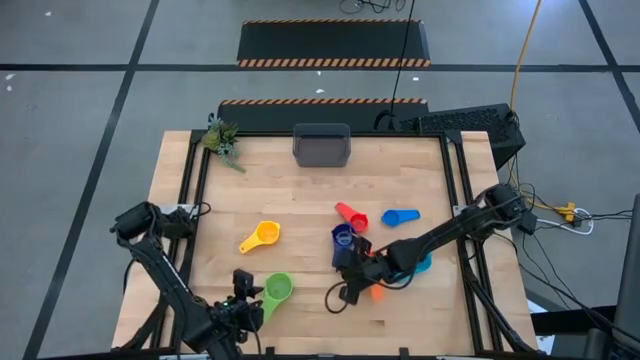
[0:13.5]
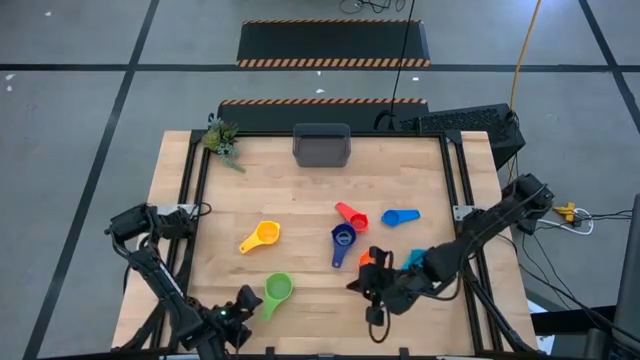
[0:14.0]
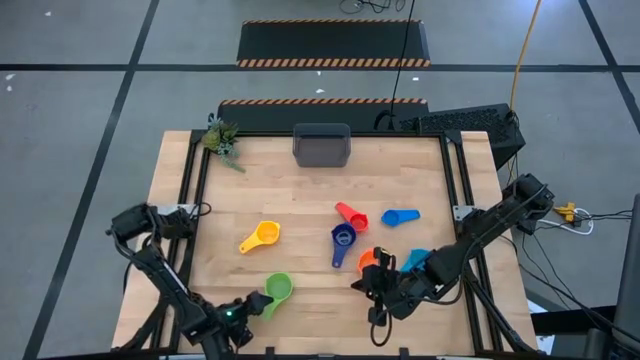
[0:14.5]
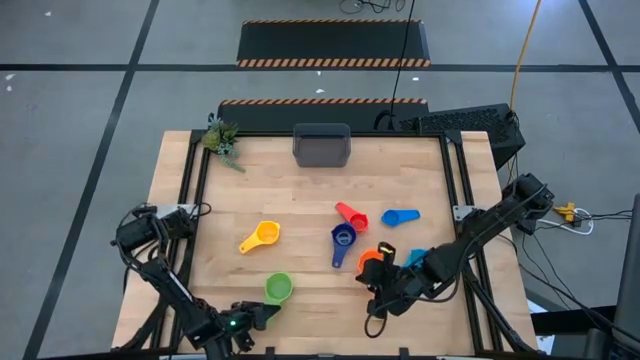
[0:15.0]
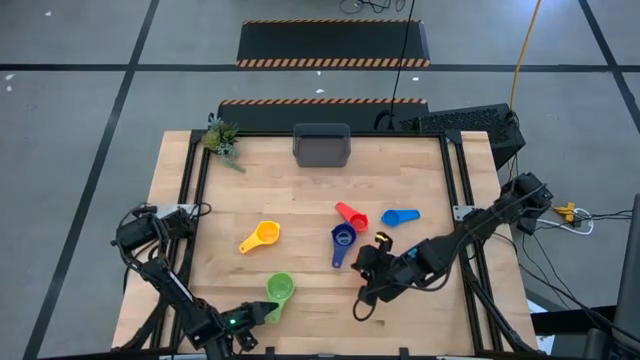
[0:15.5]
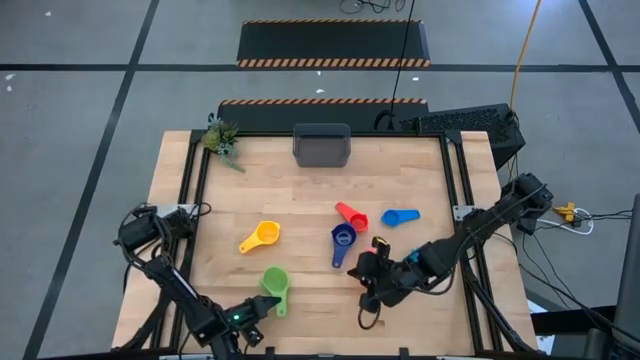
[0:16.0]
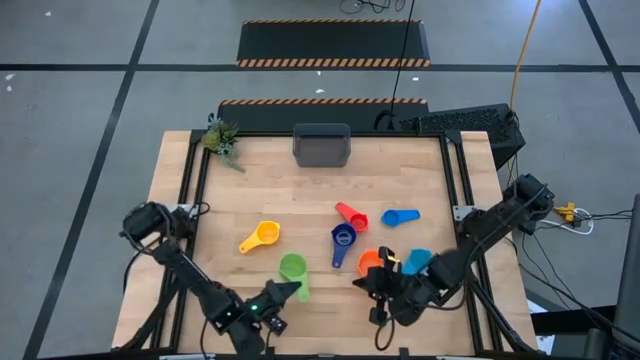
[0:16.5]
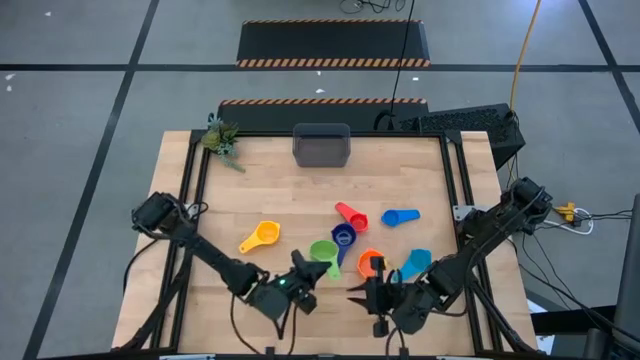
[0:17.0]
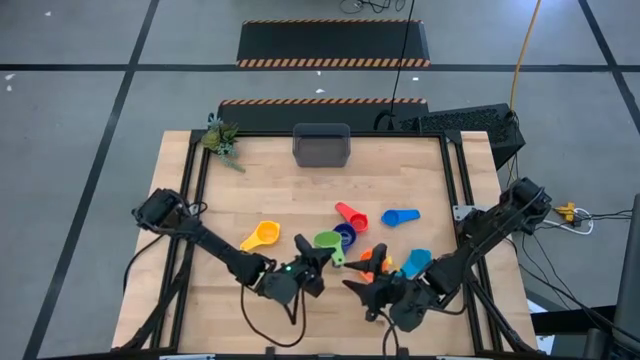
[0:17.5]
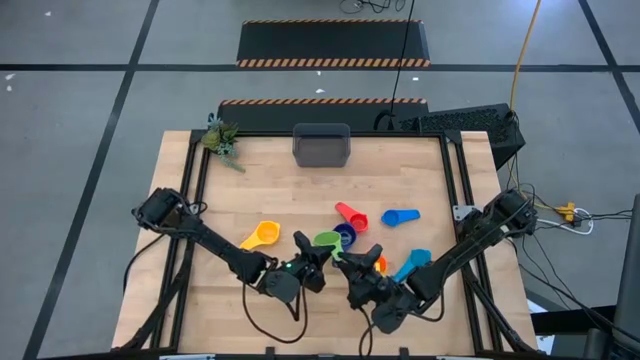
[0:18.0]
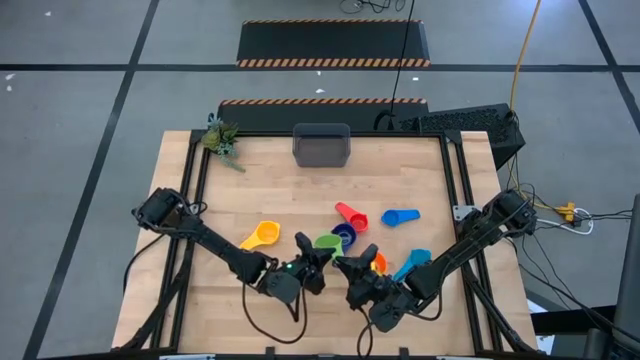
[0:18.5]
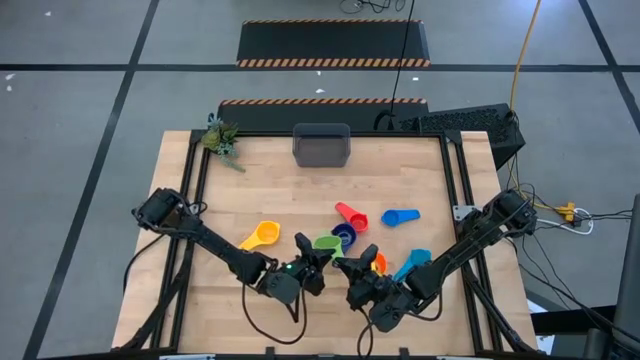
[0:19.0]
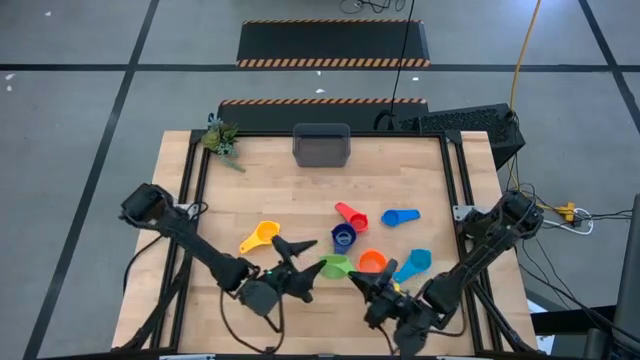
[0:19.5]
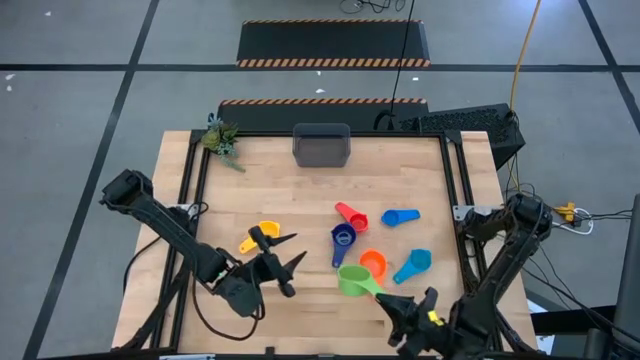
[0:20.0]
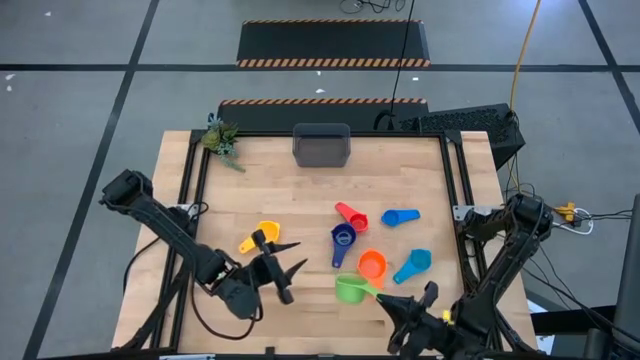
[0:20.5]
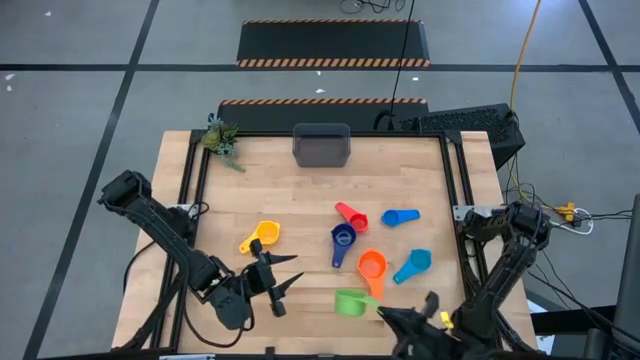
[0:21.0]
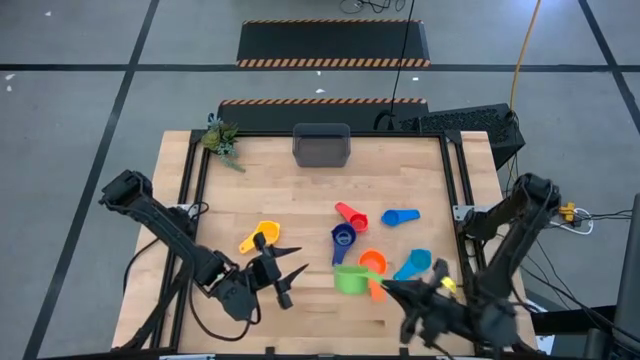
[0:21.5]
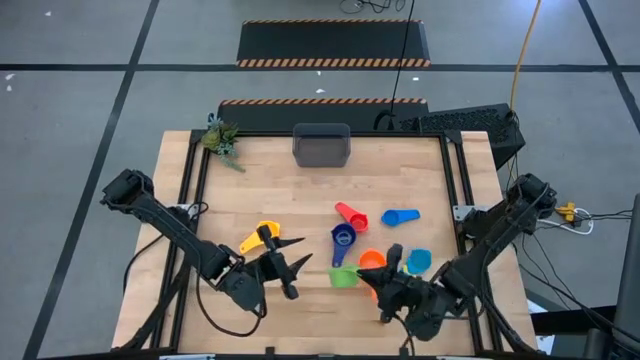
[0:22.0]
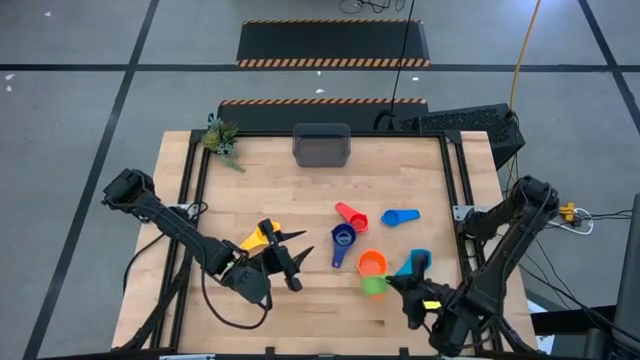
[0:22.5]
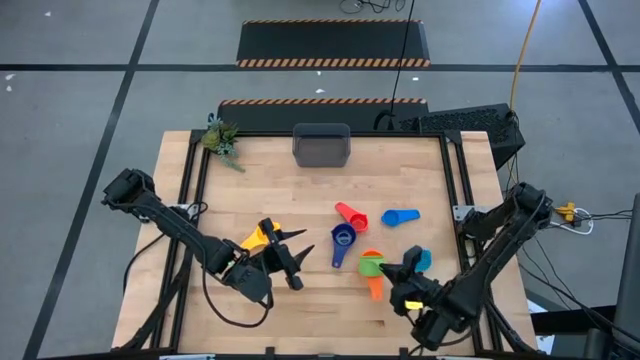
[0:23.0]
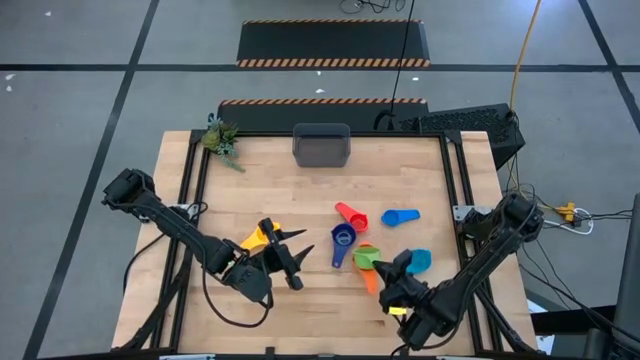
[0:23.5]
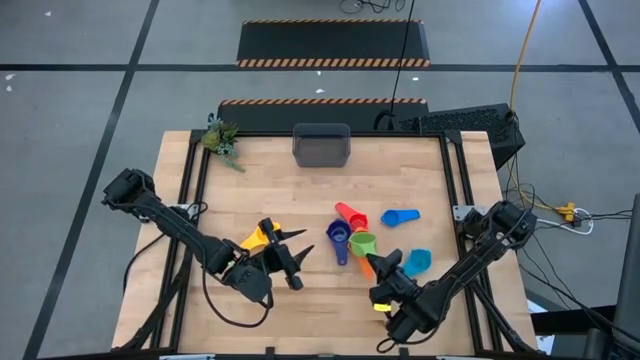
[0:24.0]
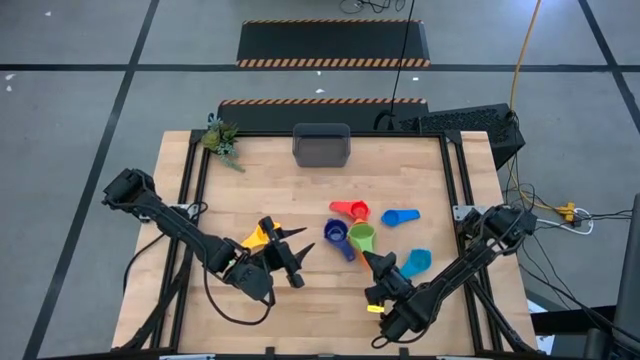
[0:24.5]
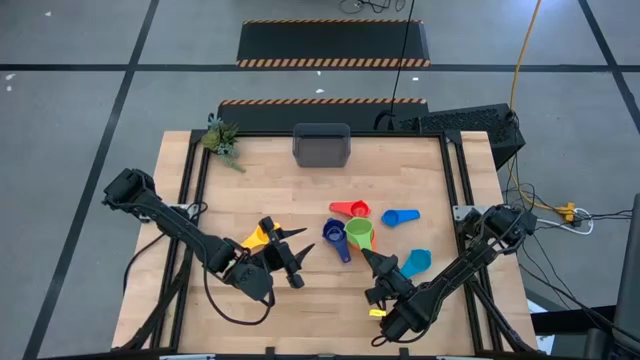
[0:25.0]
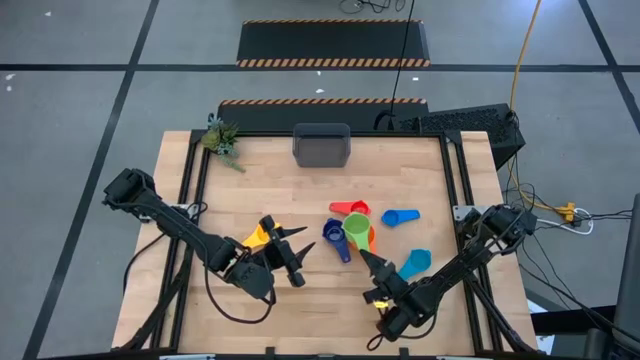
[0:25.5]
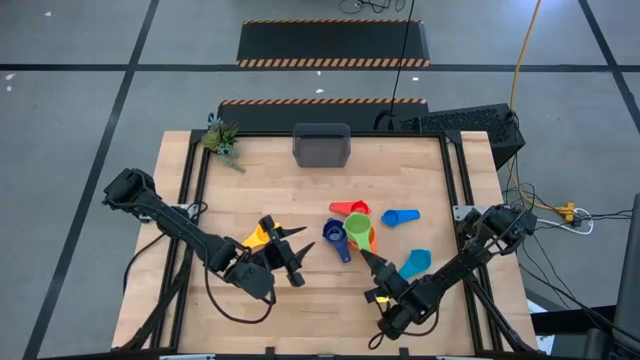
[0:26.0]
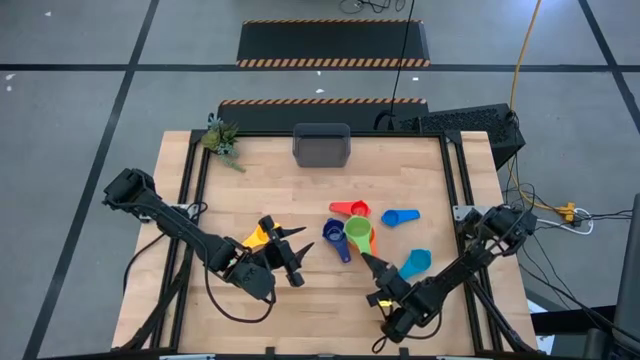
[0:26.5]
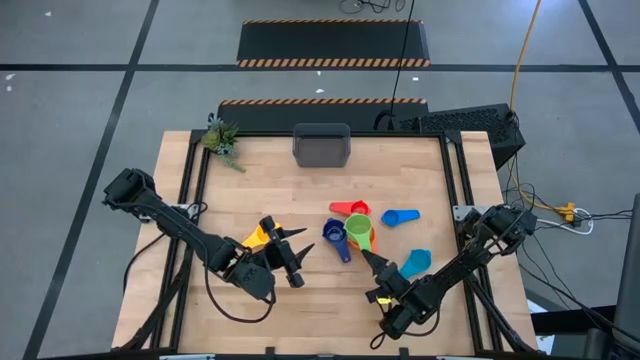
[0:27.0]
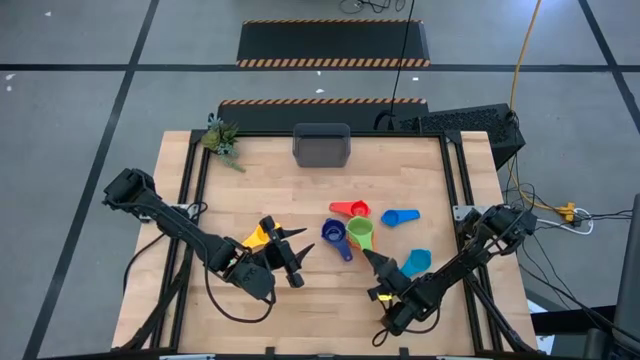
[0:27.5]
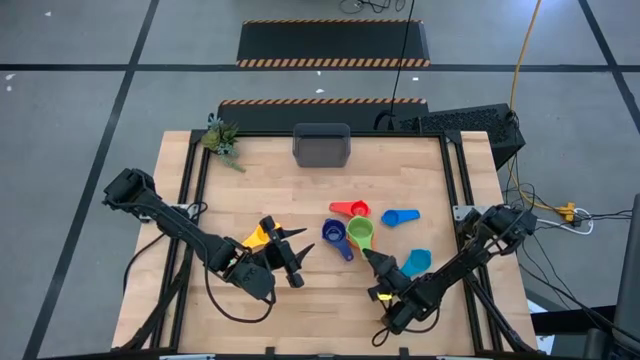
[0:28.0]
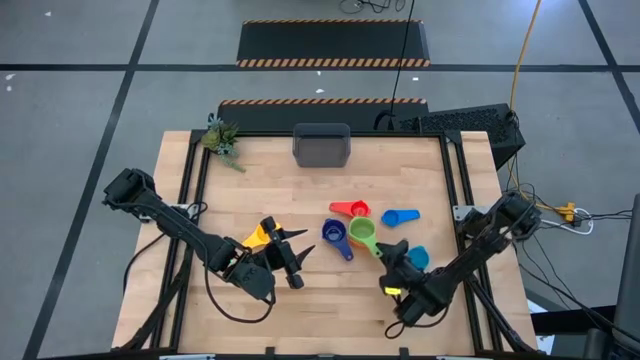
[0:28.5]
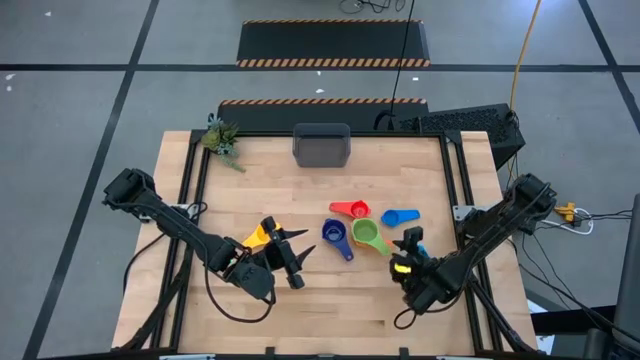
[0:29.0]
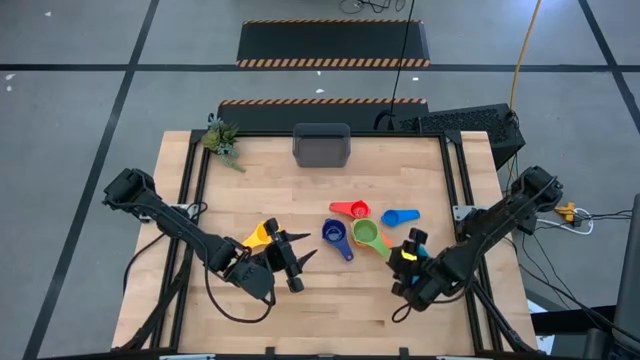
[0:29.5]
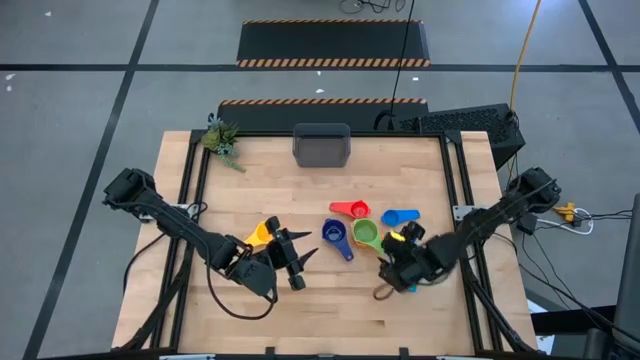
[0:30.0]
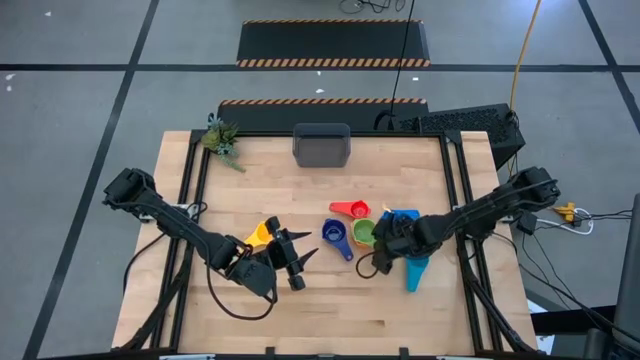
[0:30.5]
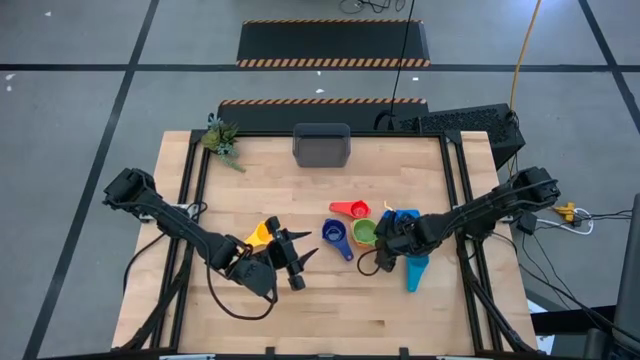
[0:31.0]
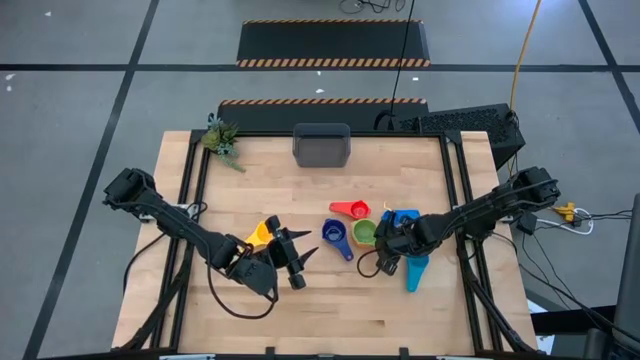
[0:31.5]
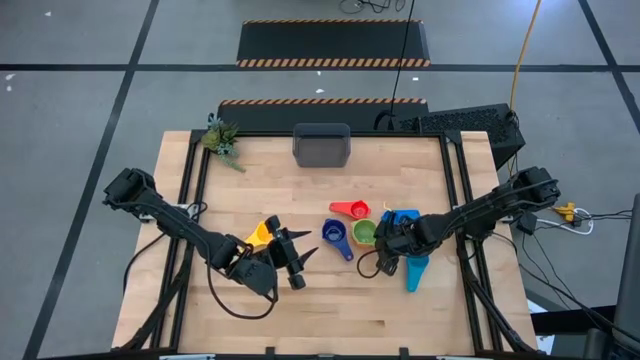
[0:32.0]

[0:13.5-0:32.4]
Task: Nest measuring cups in basket
Stack the green measuring cup on top of the orange measuring cup
